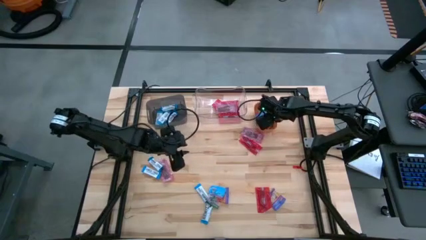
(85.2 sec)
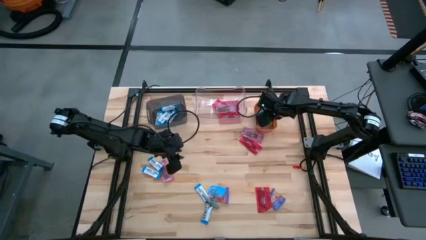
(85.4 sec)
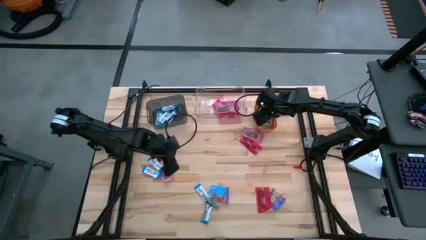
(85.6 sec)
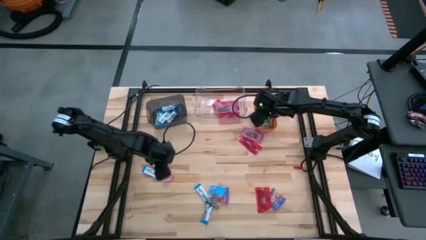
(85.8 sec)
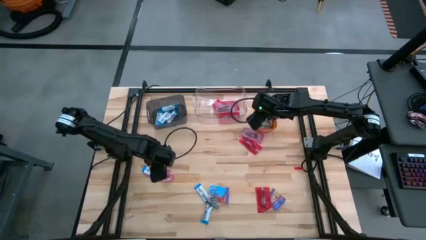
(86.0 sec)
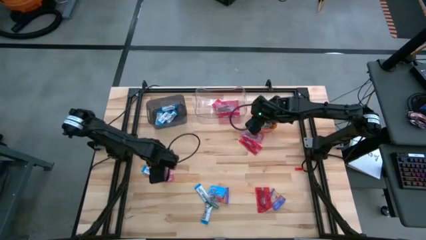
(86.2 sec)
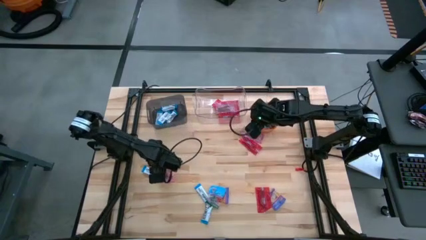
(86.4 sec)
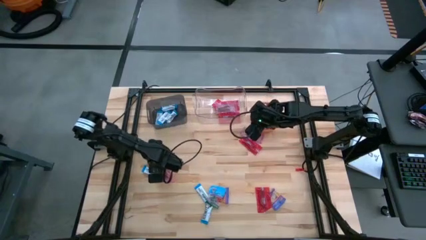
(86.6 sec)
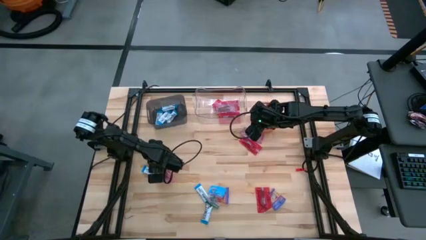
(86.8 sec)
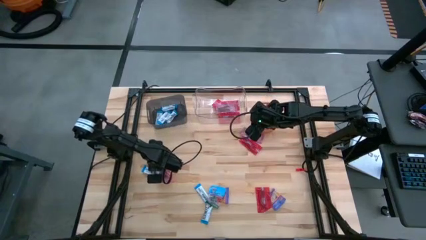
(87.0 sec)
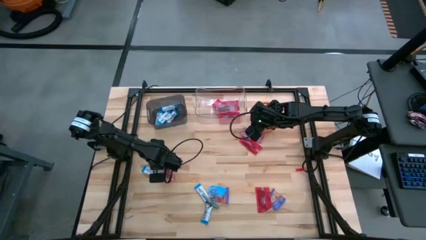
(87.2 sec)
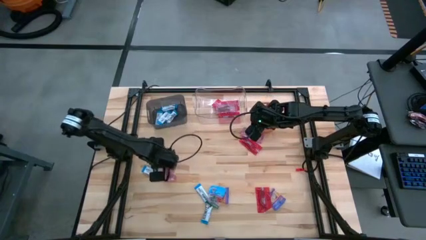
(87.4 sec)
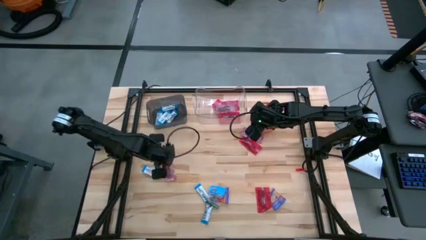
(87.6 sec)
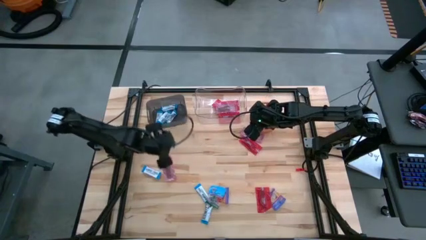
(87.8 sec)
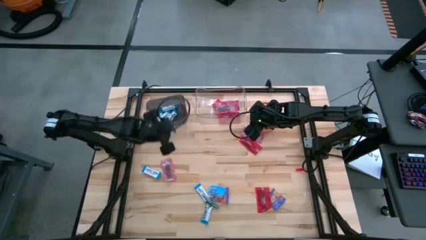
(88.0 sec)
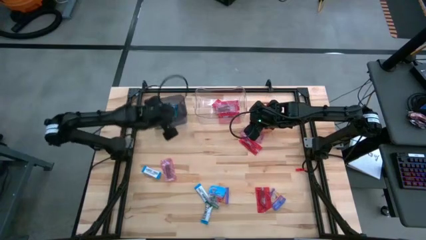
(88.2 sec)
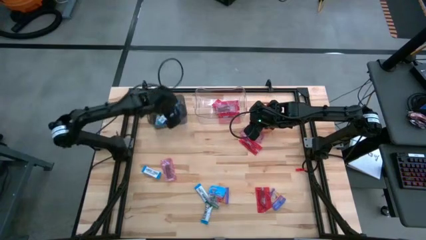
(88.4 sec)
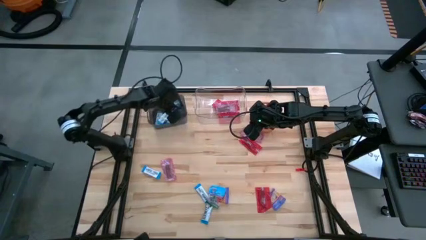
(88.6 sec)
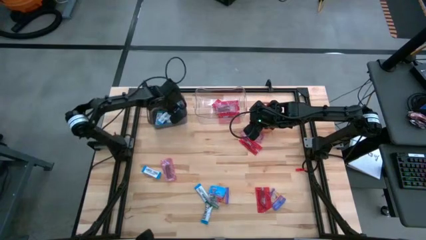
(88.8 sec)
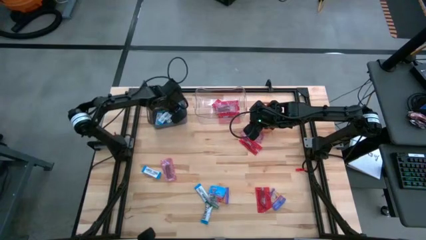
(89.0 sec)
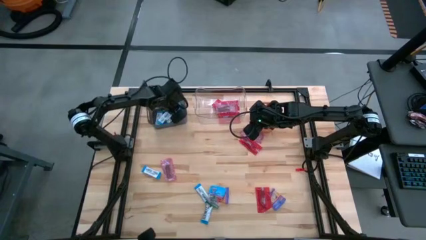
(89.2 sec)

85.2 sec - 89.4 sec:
Task: Sort candy
Put the white chocolate into the black bin

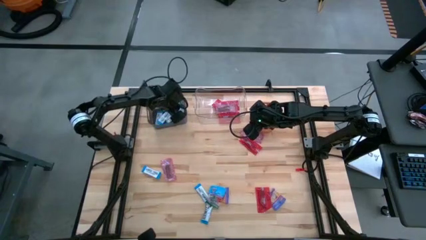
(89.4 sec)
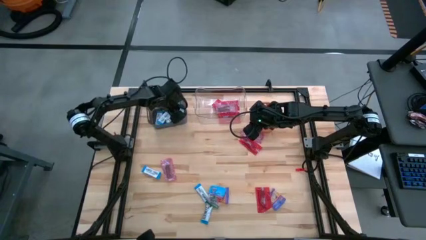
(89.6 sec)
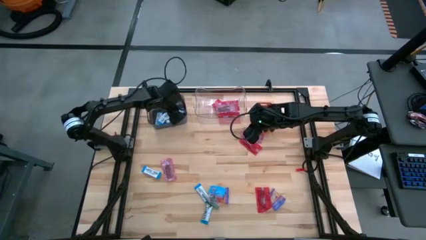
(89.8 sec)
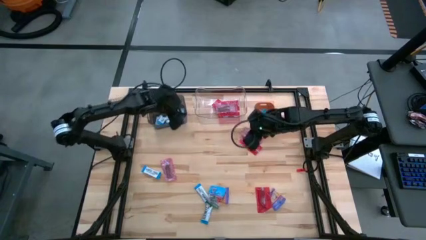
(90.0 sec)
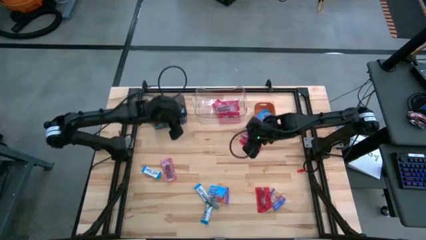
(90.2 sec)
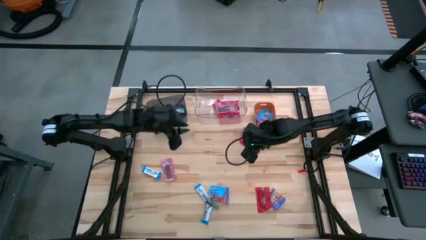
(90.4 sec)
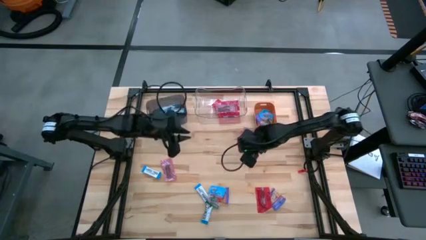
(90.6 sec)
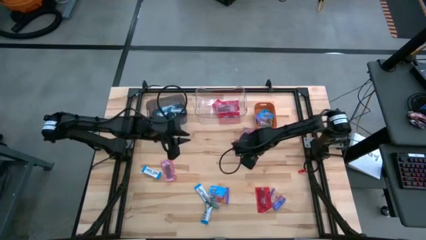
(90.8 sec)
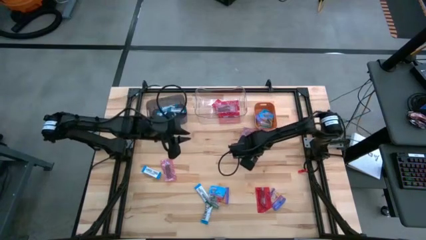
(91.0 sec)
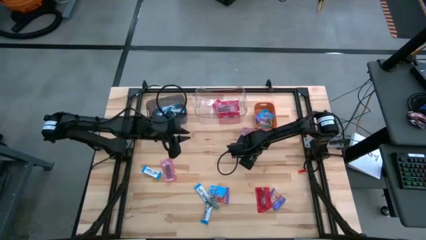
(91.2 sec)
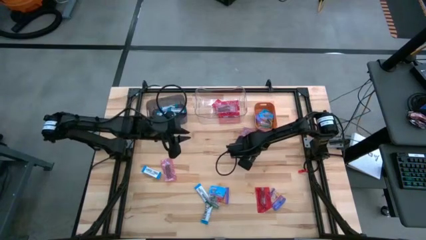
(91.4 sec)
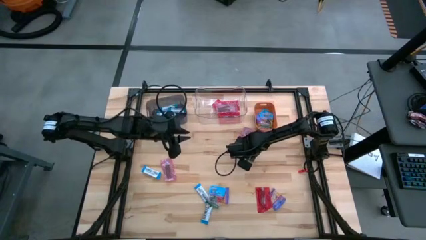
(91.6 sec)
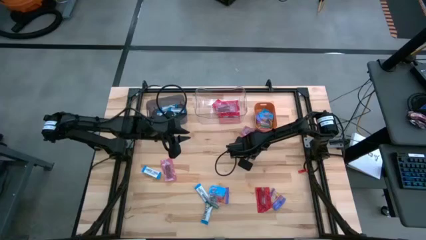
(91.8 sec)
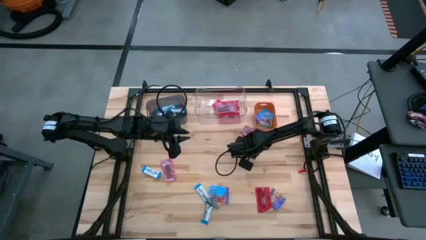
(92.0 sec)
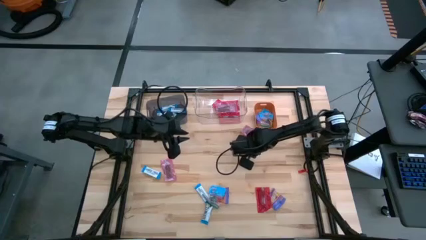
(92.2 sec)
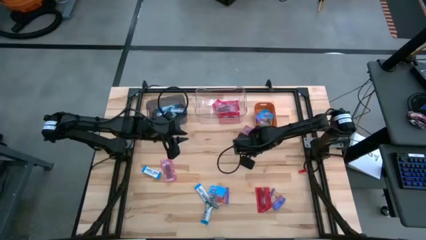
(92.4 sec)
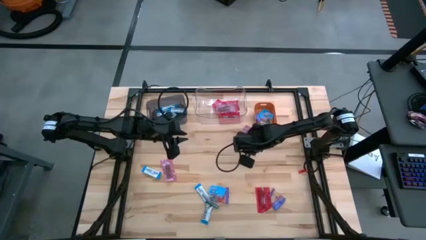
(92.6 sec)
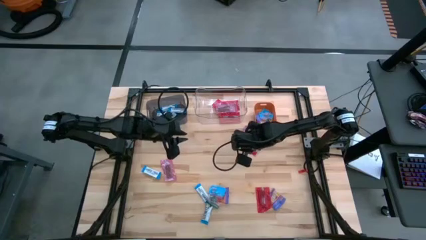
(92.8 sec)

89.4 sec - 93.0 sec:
Put the red chocolate into the transparent bin

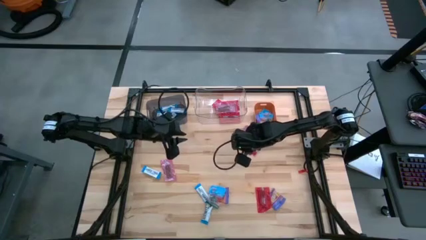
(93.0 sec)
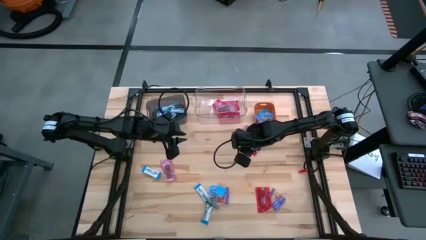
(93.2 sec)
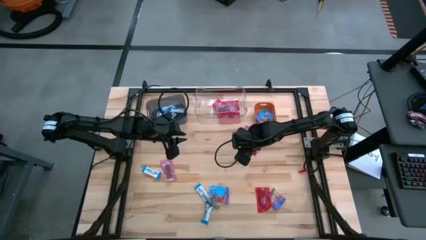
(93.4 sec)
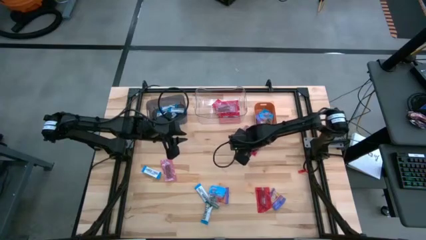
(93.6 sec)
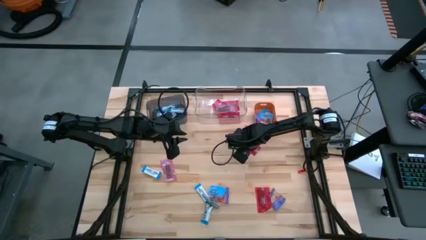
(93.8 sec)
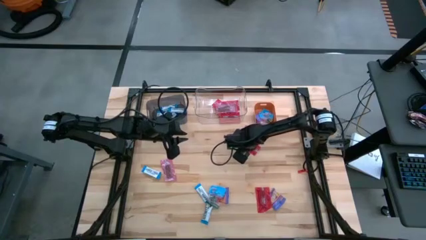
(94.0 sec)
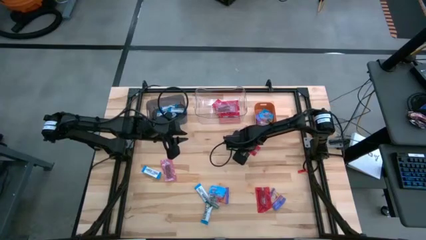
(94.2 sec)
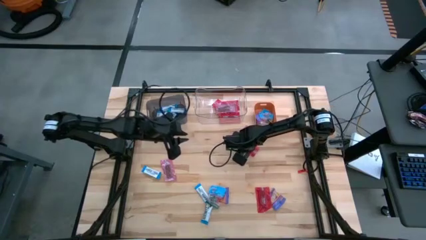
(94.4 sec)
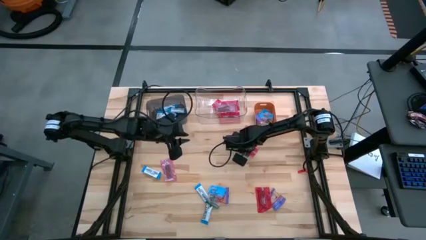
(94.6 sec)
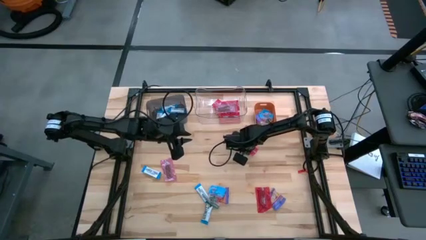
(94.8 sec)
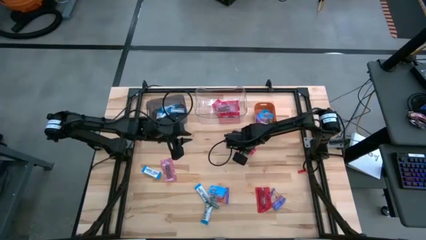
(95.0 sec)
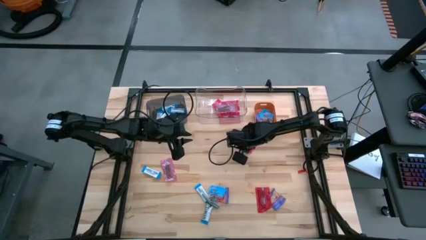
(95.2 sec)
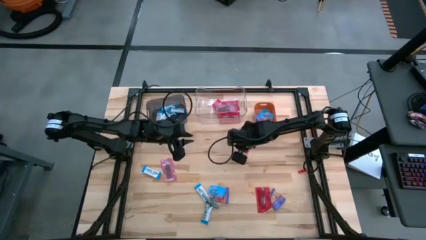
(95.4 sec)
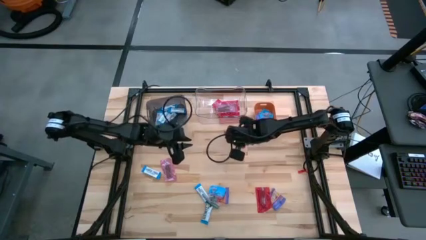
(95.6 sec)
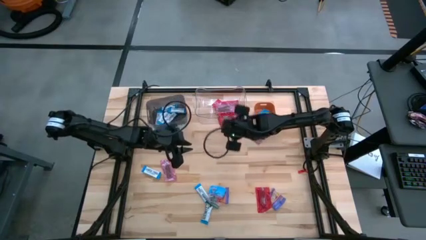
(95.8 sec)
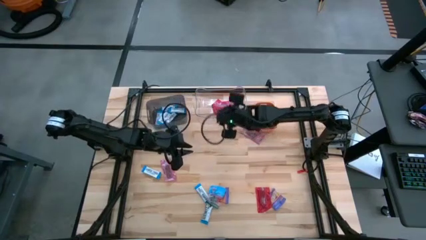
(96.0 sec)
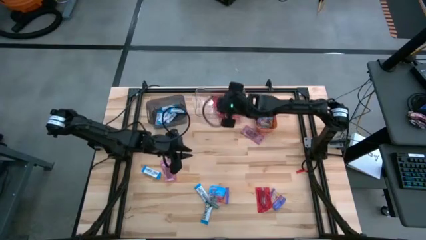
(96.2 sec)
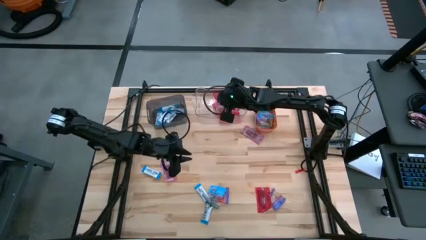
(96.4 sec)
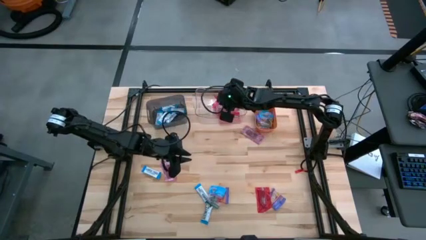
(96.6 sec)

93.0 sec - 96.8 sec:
Put the red chocolate into the transparent bin

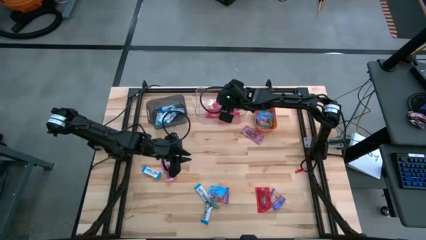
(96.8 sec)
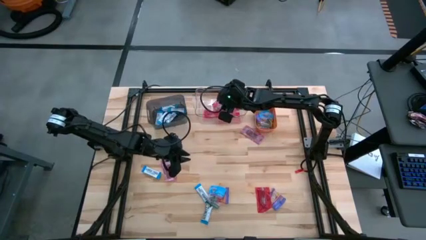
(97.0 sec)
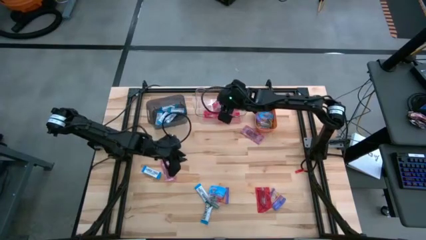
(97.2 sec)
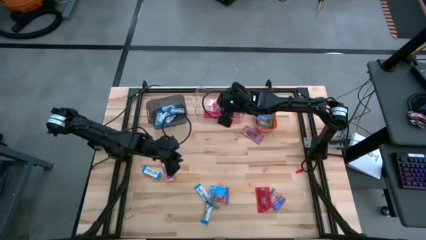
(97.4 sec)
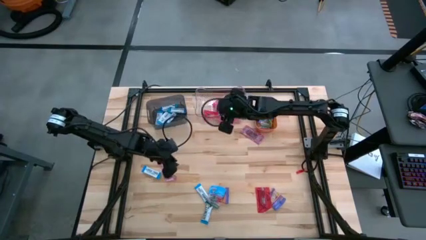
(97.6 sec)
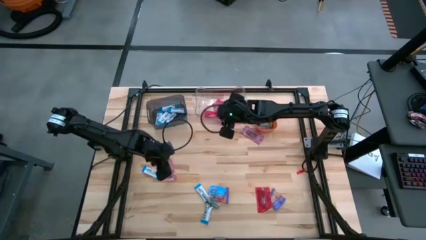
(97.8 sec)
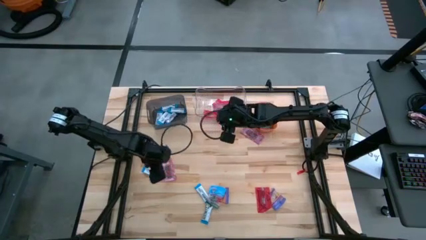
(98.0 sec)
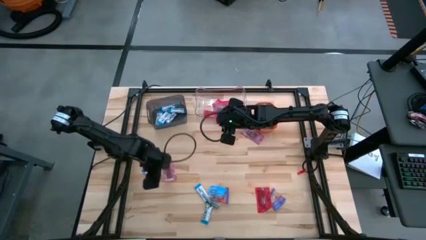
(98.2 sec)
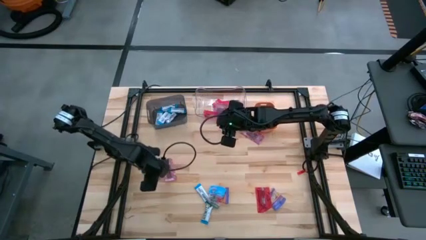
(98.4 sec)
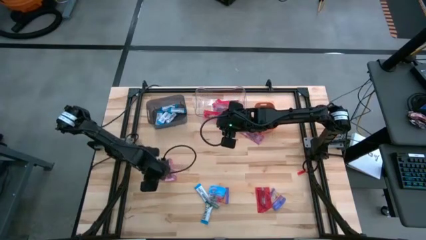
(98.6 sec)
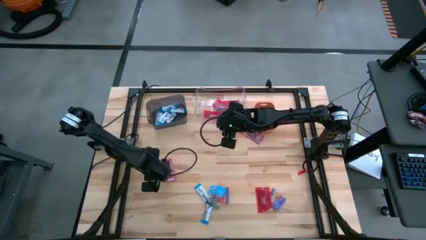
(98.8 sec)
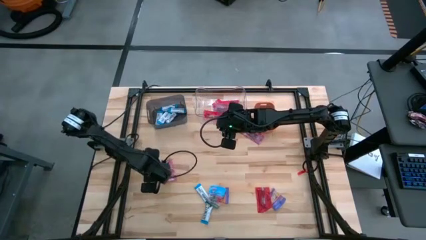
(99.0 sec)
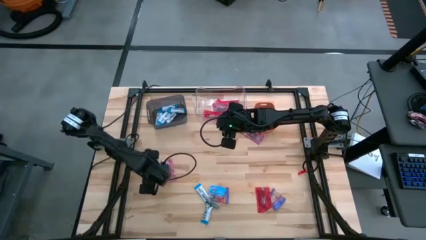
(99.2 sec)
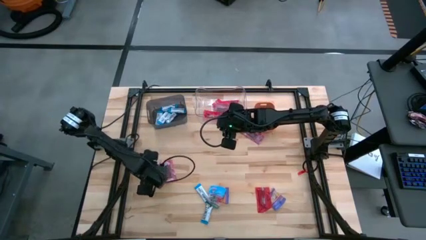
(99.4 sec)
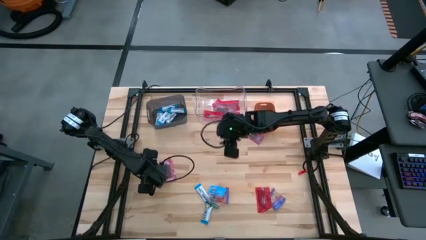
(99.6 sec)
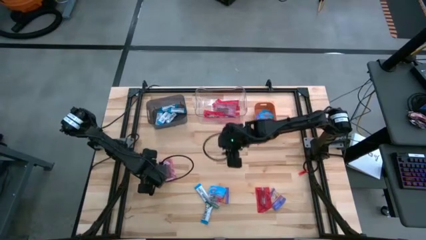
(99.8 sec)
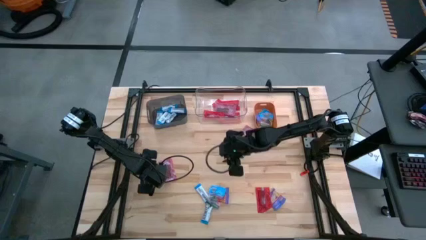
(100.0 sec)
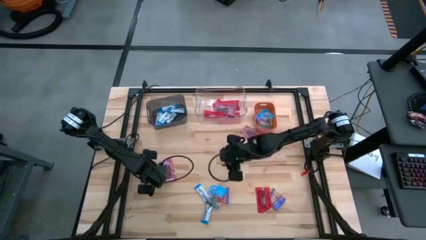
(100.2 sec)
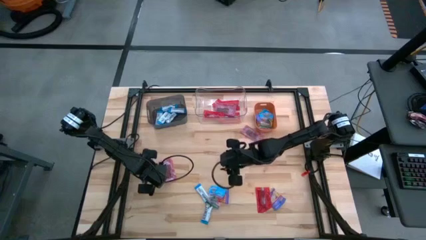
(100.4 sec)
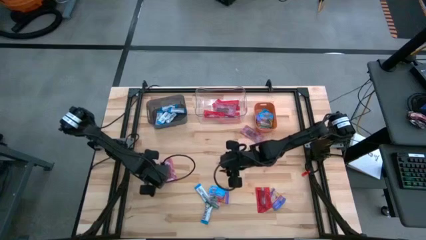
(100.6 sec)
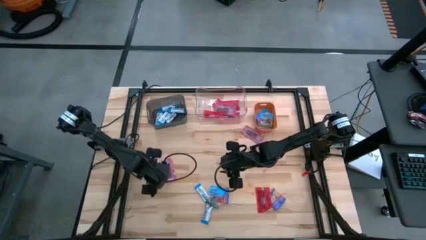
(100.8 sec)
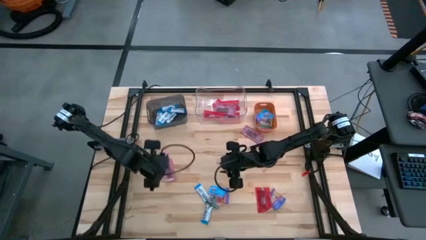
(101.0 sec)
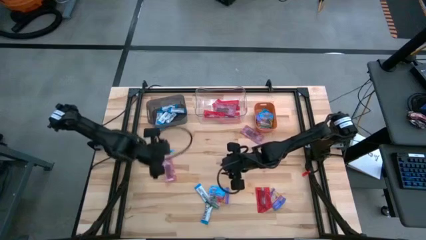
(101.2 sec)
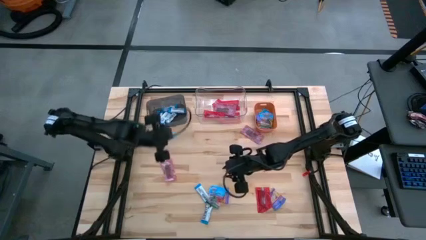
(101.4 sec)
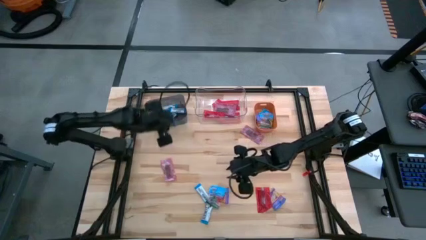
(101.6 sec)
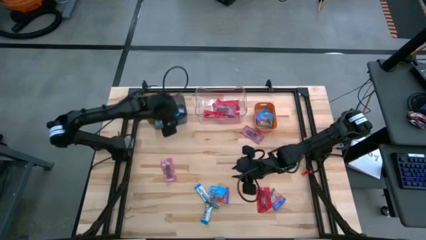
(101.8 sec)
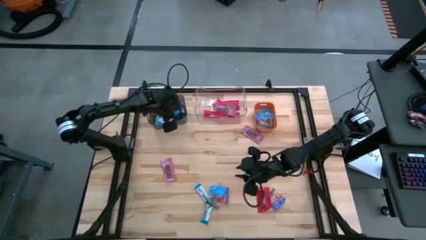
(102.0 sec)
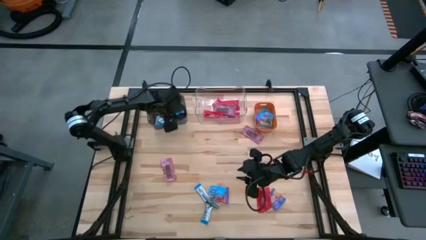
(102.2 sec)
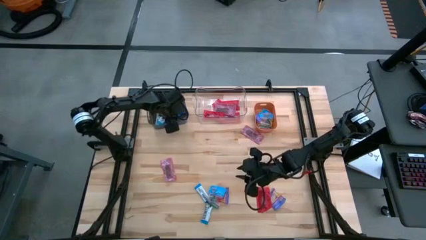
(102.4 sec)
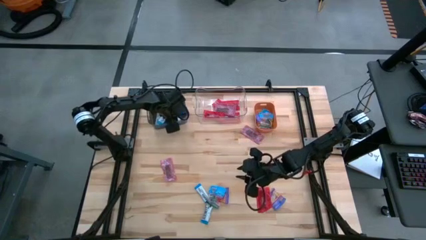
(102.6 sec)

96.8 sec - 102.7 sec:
Put the white chocolate into the black bin
